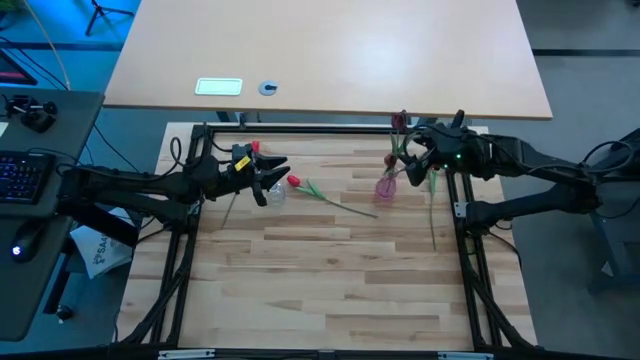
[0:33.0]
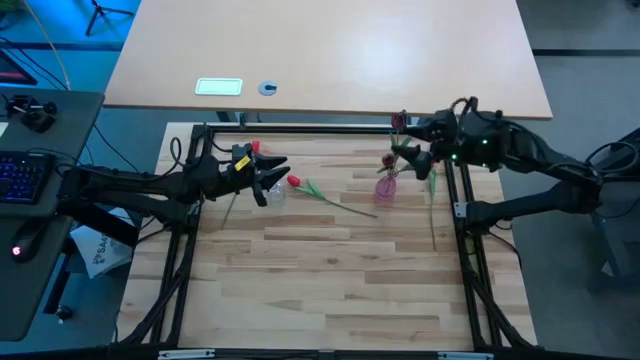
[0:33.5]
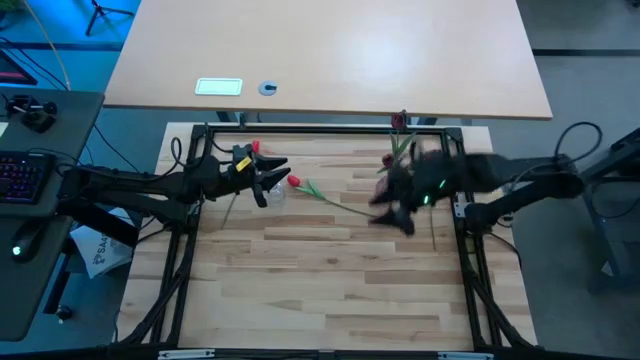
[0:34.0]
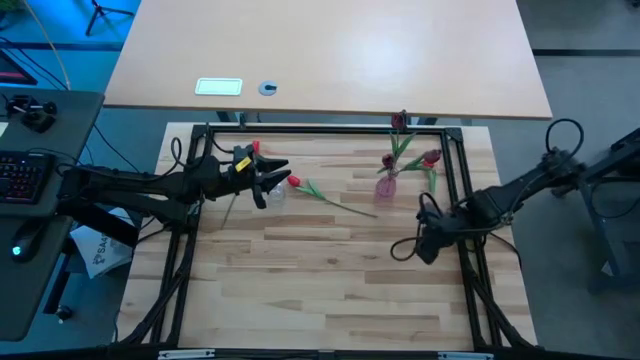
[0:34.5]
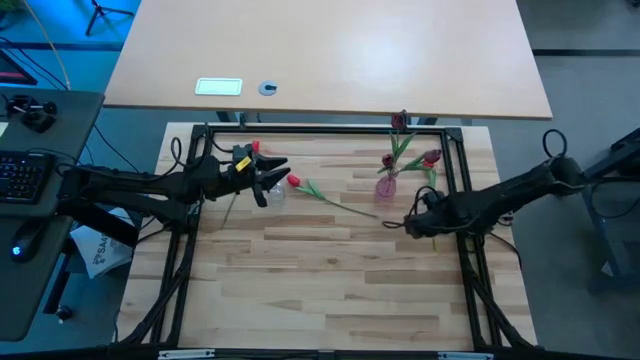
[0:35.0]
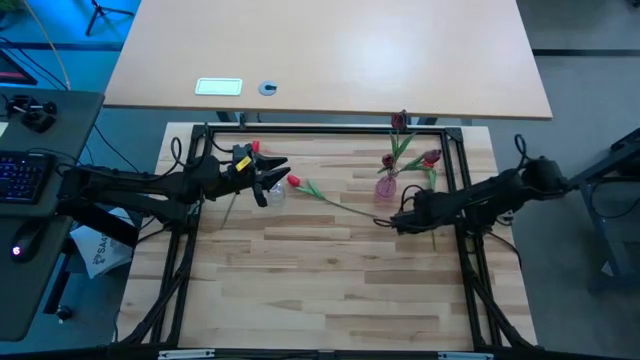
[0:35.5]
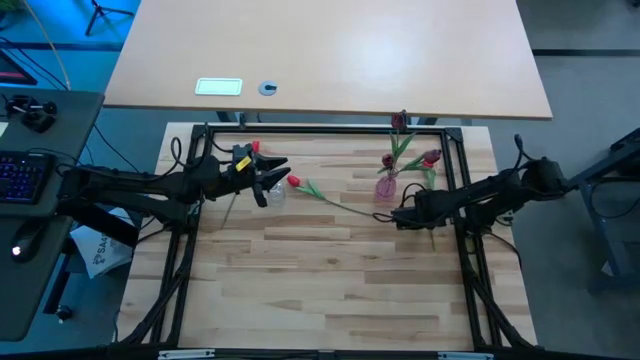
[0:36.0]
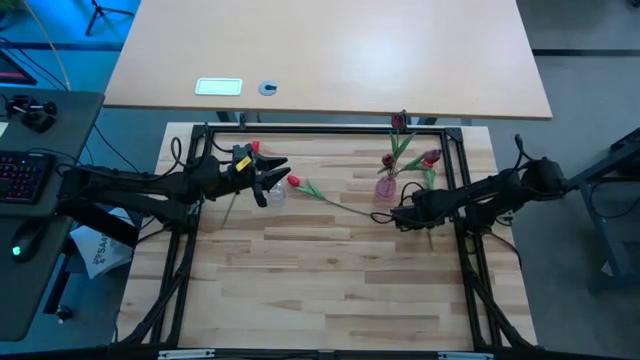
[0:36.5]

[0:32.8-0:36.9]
Task: Sort flowers into vase by color
Put the top right red tulip into the transparent vase

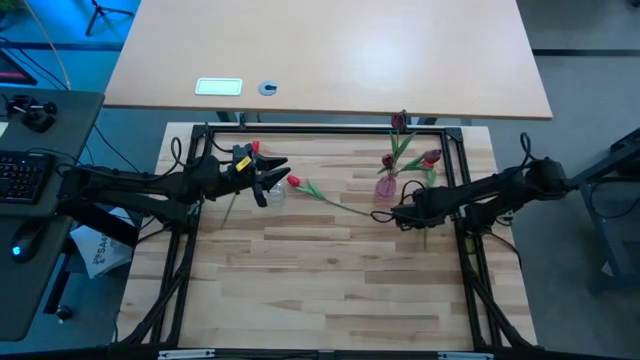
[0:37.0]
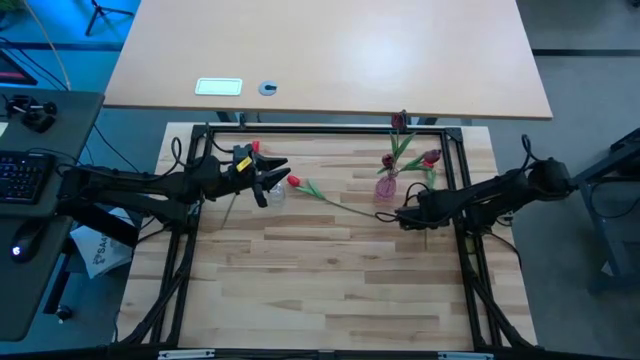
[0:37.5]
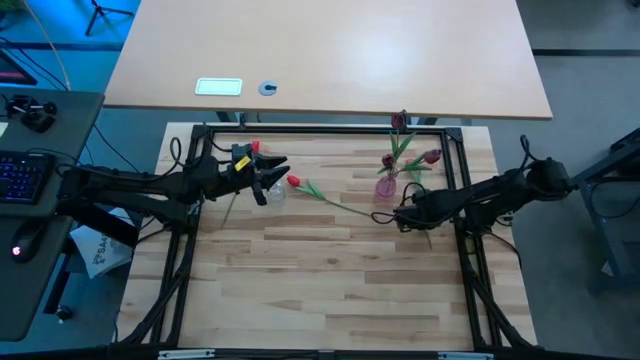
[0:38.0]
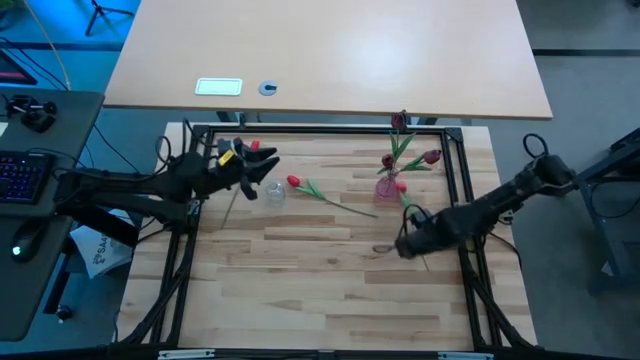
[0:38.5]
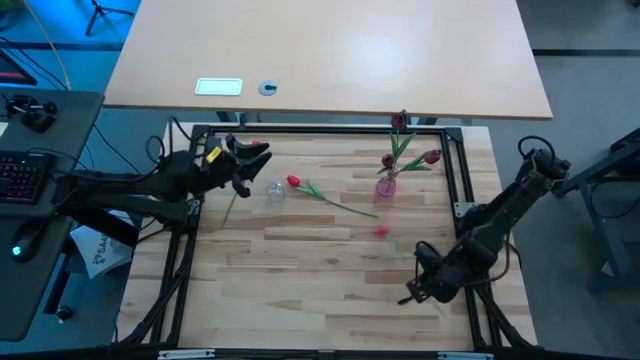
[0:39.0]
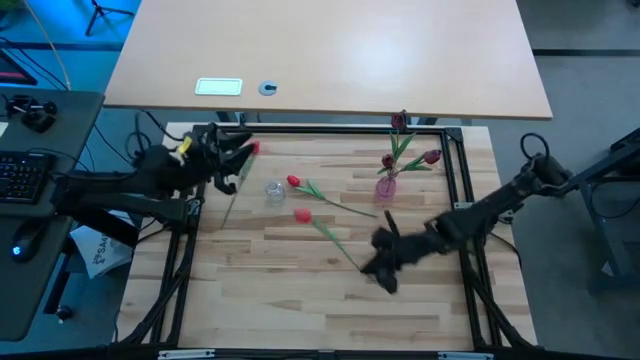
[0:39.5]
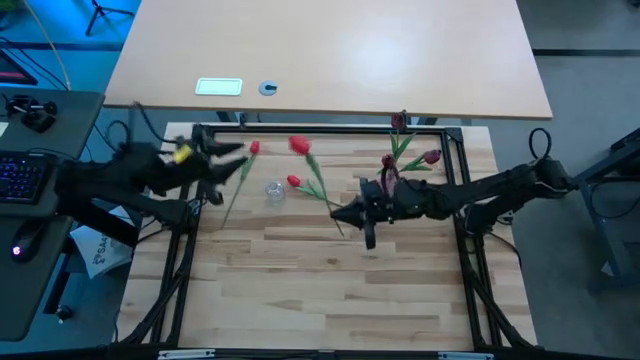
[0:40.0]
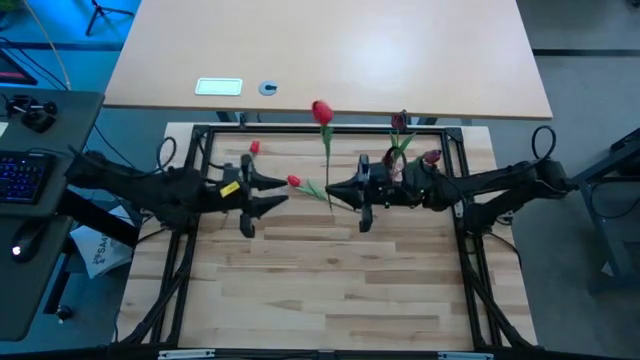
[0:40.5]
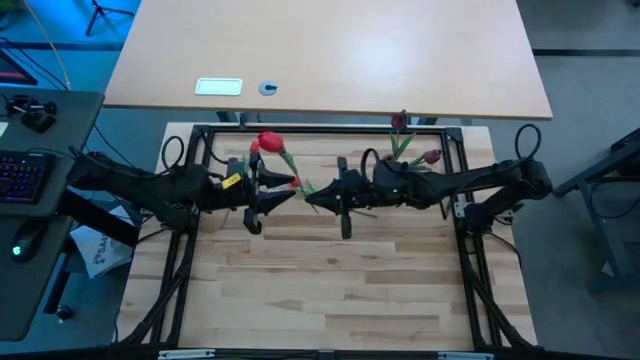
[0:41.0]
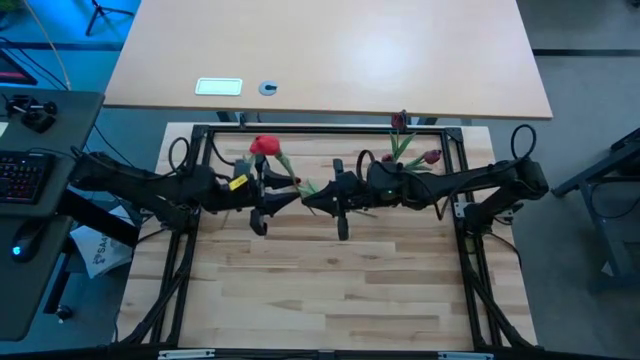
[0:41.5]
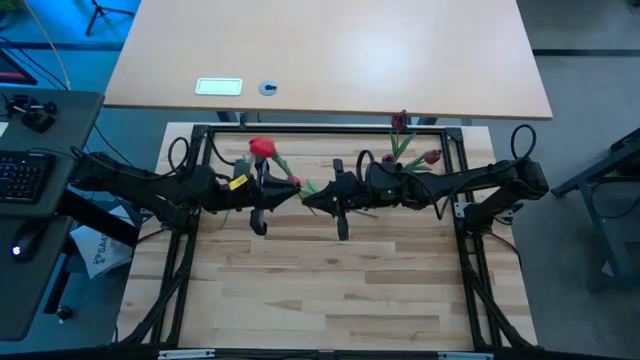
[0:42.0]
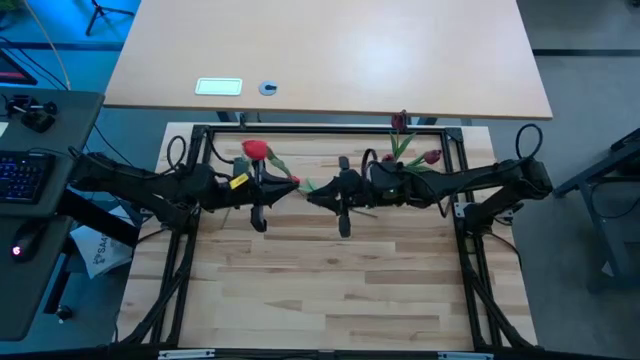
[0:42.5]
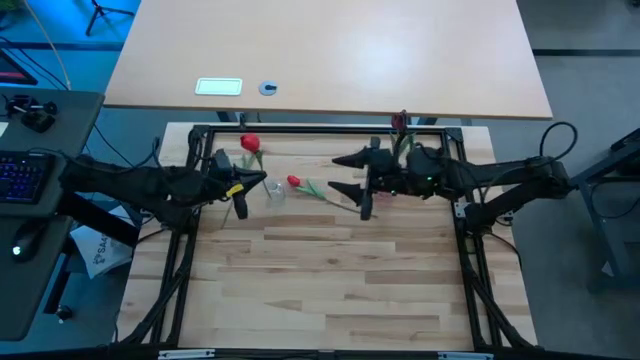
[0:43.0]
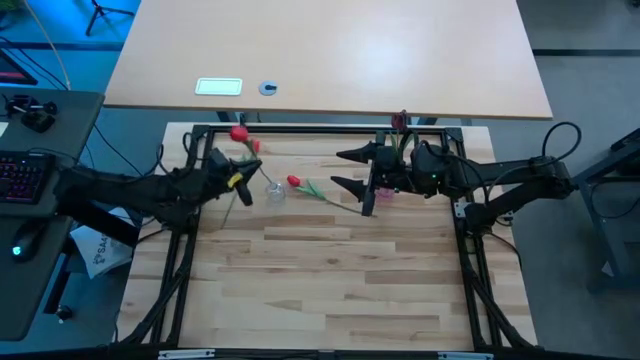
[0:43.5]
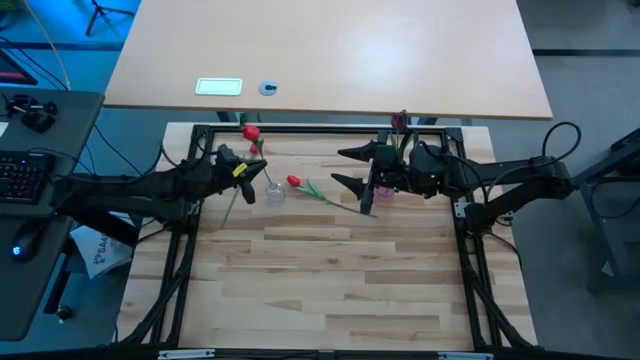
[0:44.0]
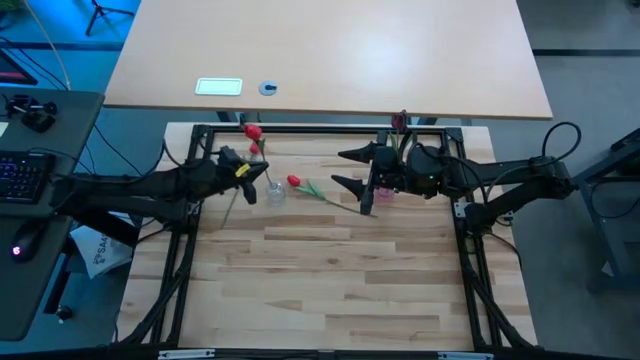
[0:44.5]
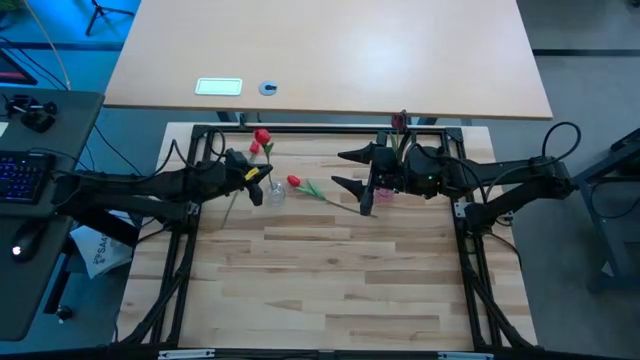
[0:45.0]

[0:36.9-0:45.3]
Put the top right red tulip into the transparent vase

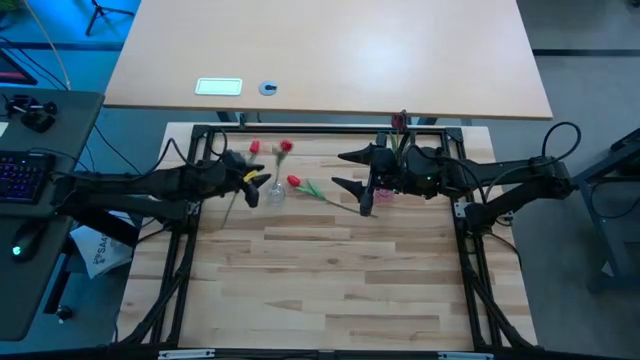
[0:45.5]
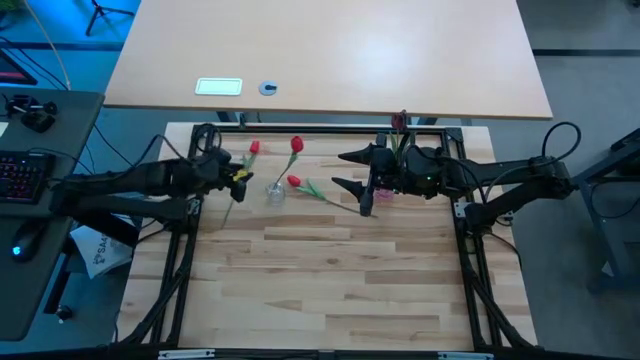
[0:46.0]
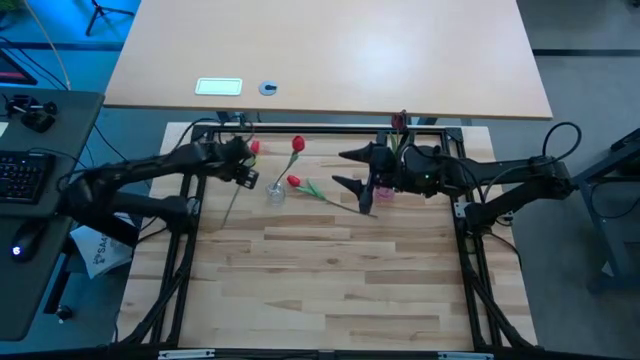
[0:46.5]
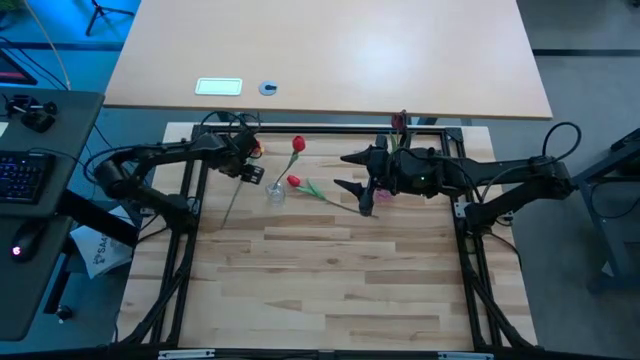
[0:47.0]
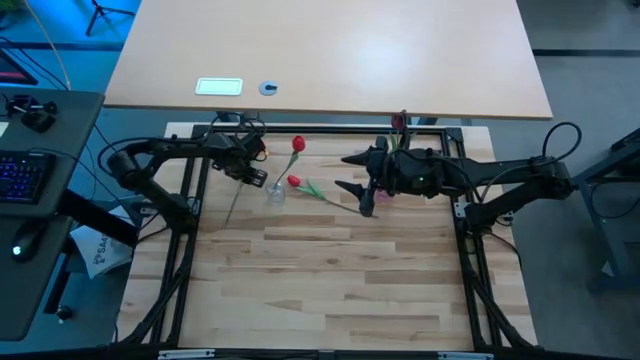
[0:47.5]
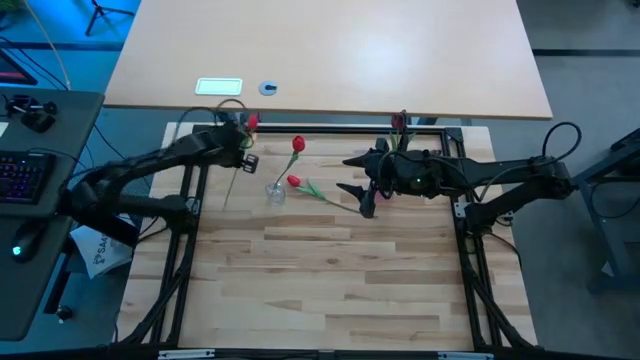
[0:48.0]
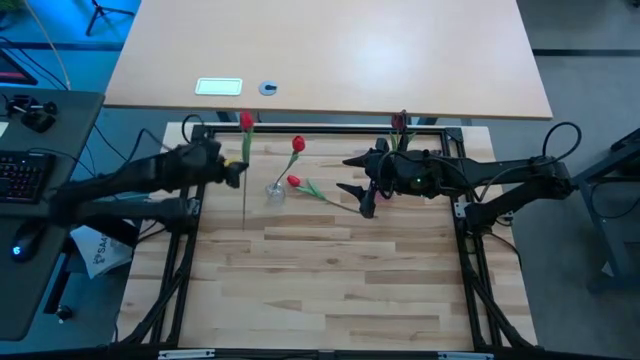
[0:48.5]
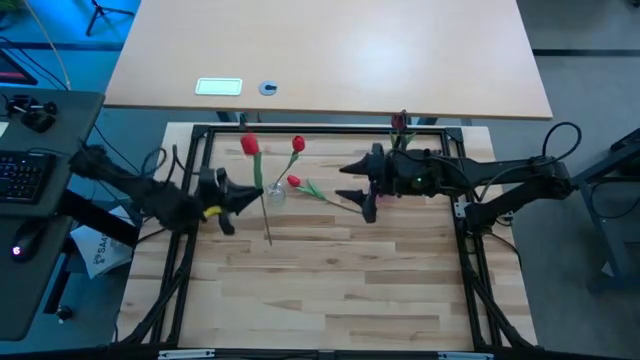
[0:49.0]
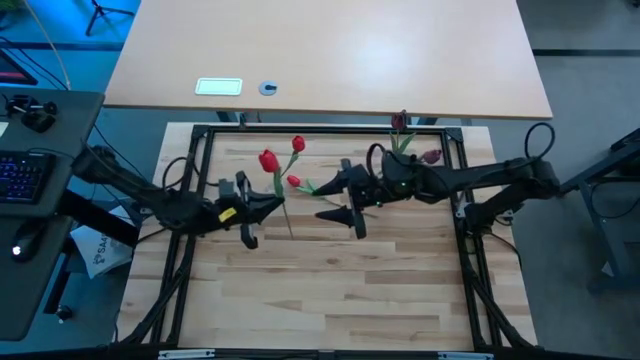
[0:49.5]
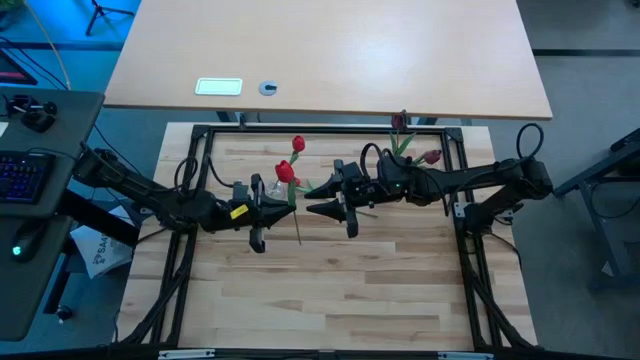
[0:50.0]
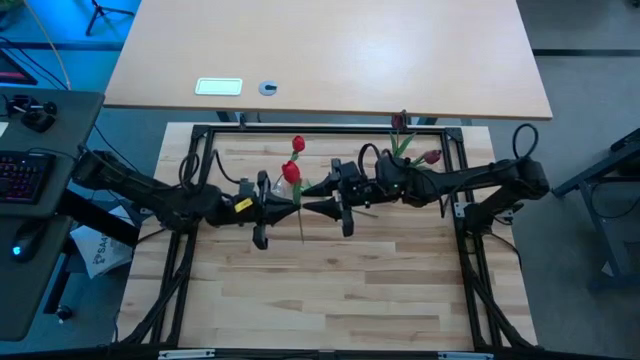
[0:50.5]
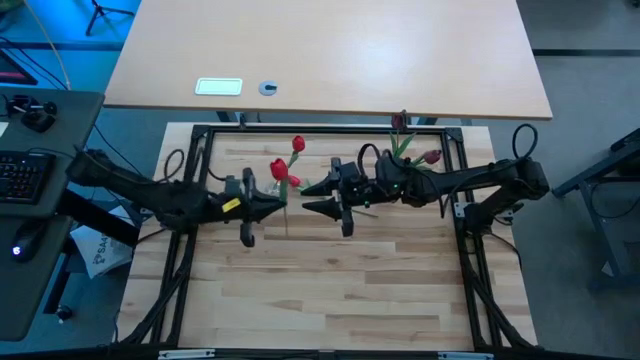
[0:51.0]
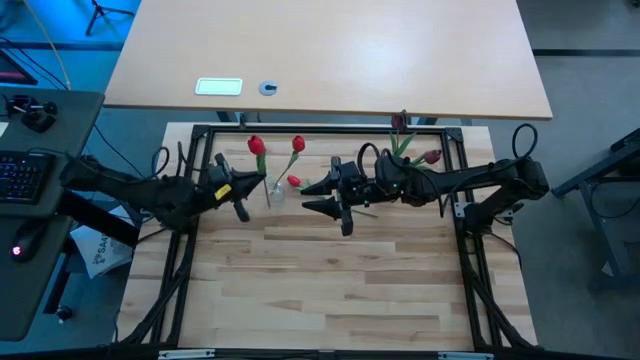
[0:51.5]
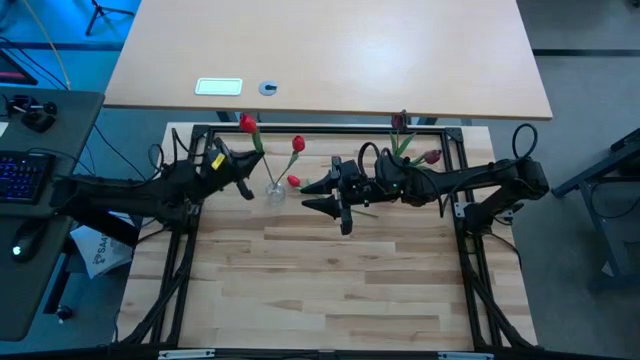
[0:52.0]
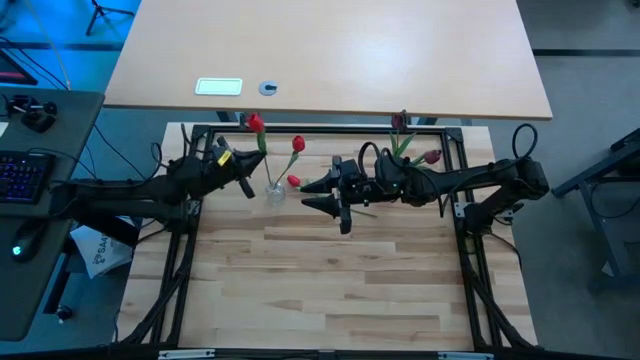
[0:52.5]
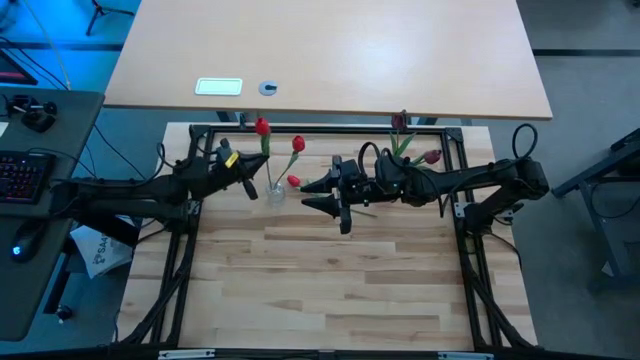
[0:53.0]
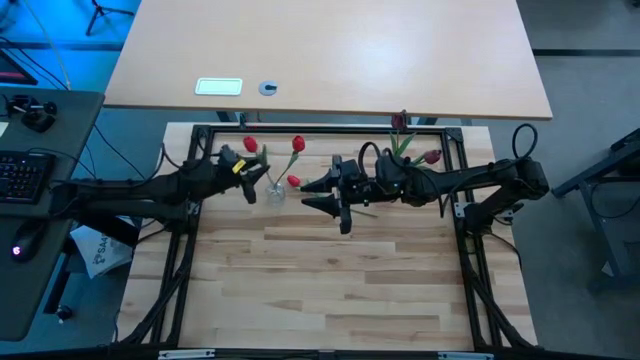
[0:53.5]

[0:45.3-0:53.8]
Put the left red tulip into the transparent vase

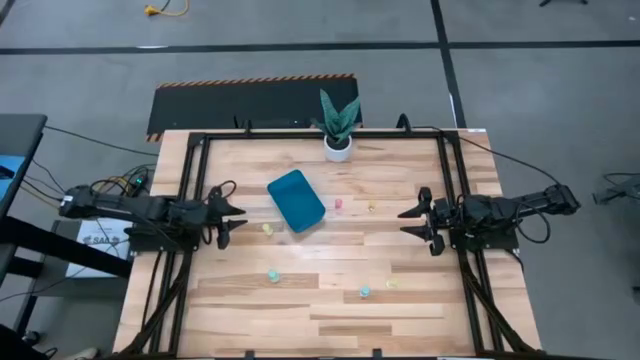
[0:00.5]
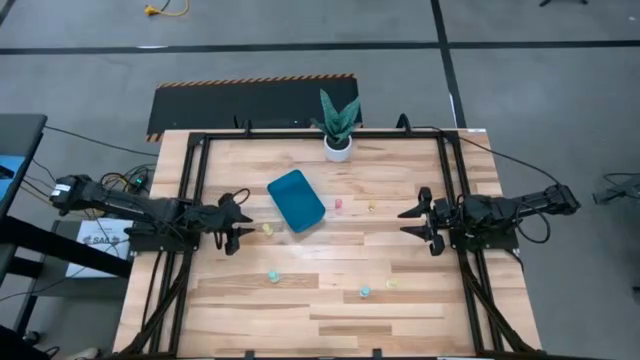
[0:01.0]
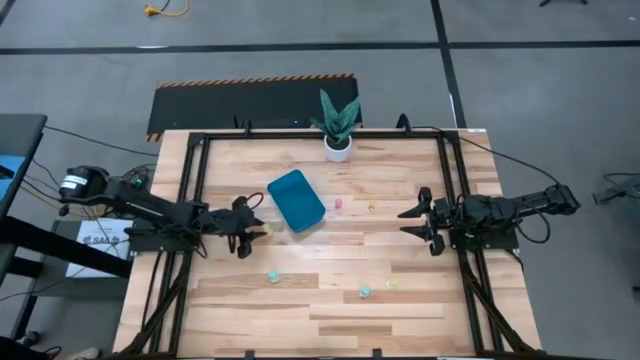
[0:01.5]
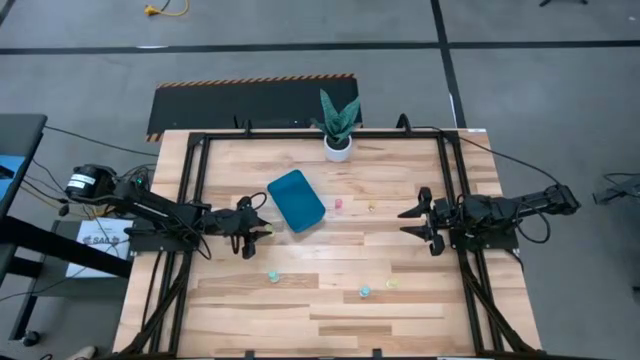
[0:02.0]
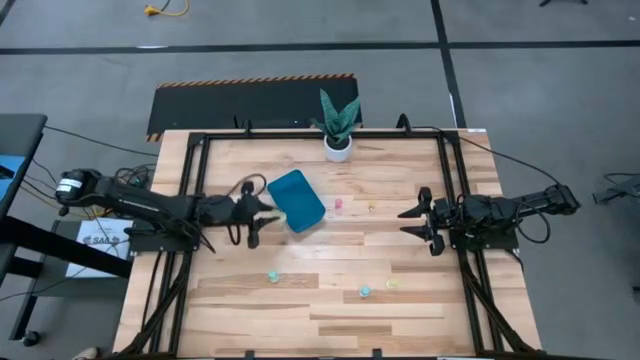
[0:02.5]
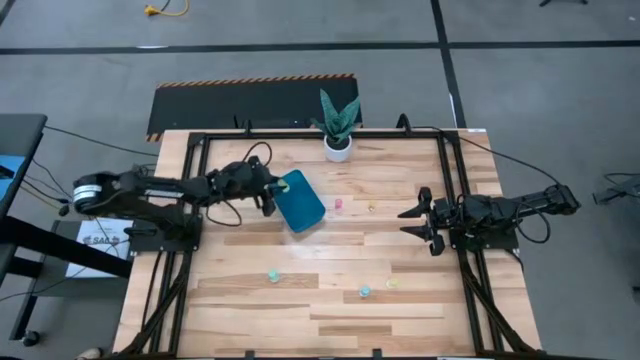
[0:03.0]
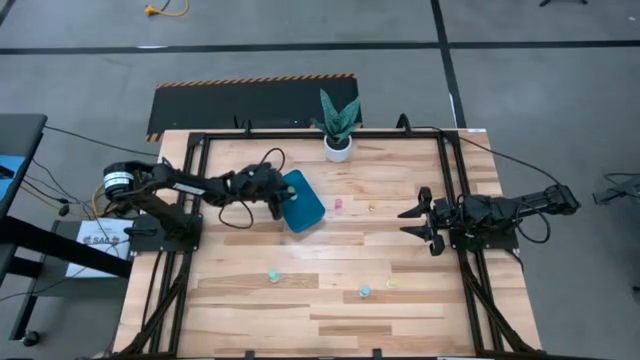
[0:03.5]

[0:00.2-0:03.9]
Task: Pick and place pill bottles into a basket
Put the top left yellow medicine bottle into the blue bin
